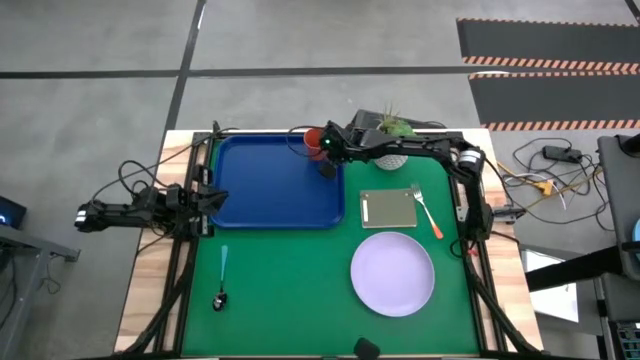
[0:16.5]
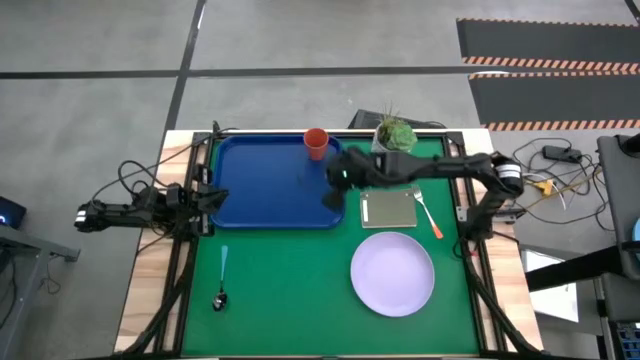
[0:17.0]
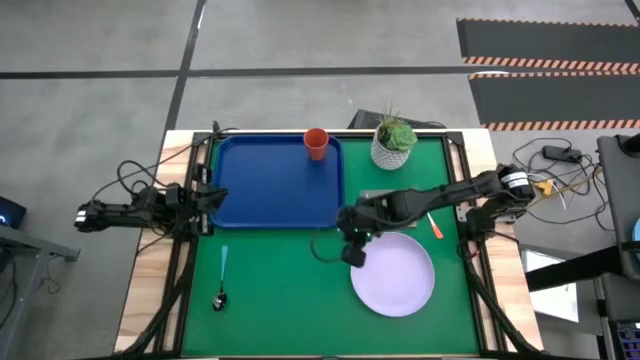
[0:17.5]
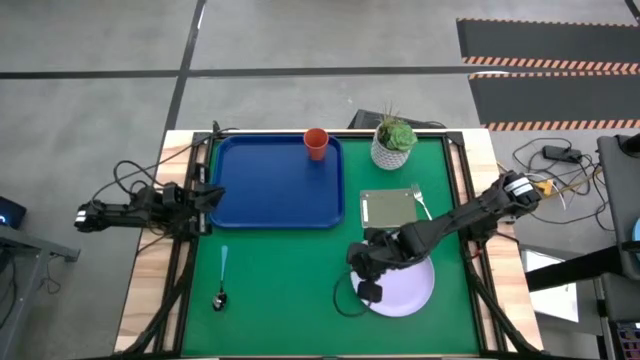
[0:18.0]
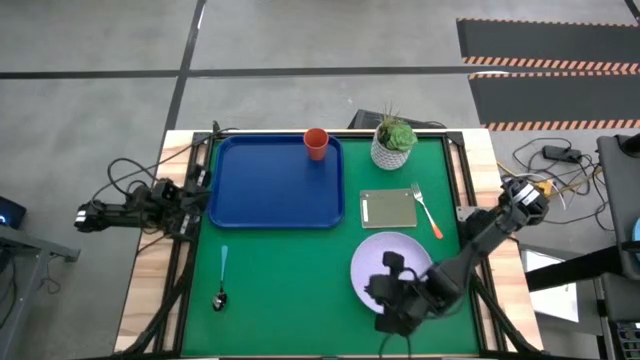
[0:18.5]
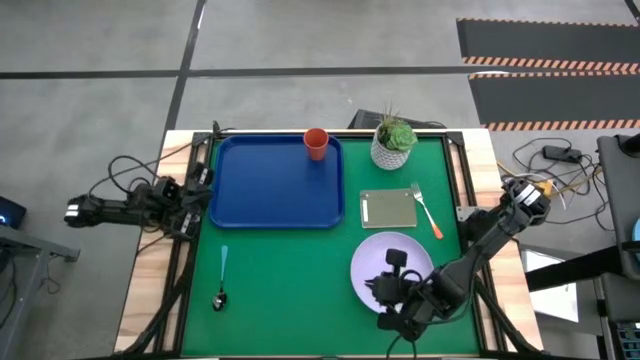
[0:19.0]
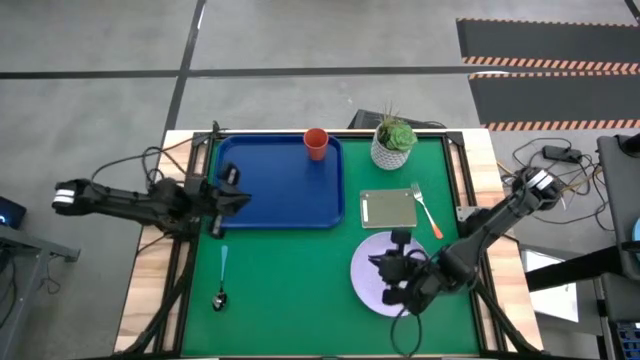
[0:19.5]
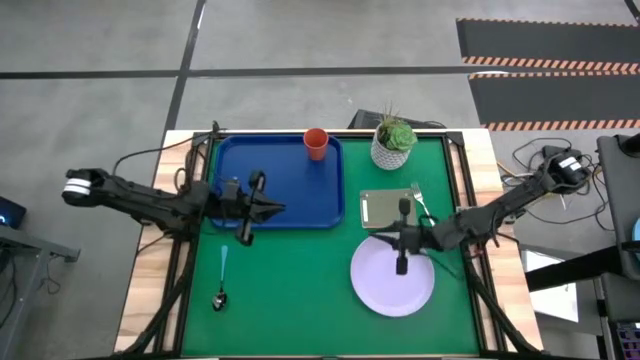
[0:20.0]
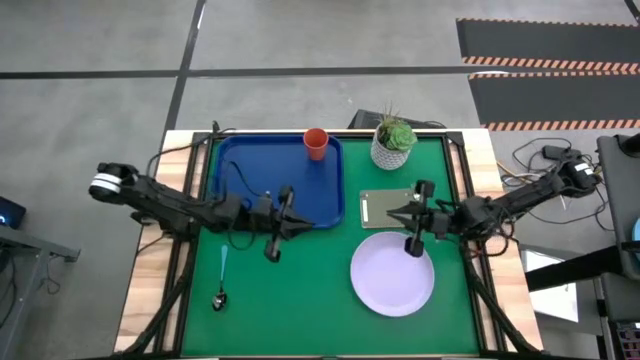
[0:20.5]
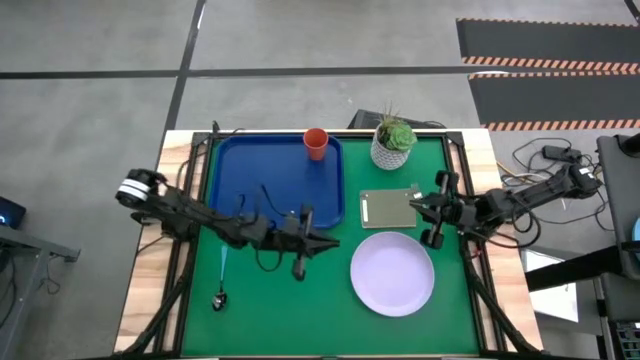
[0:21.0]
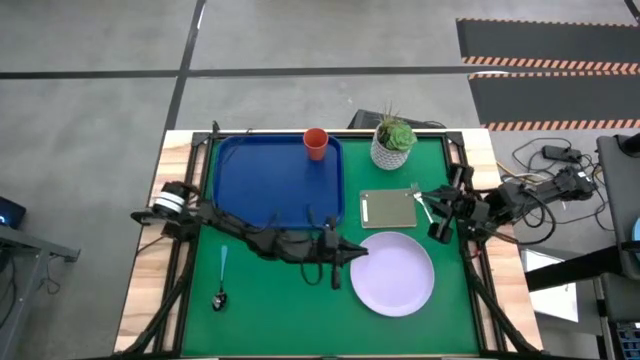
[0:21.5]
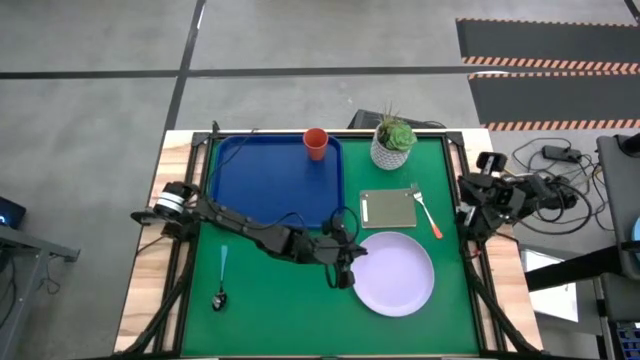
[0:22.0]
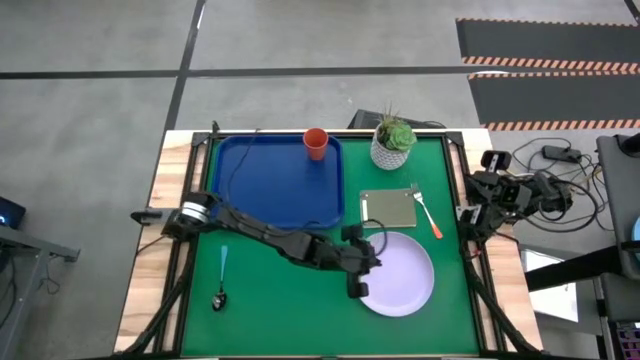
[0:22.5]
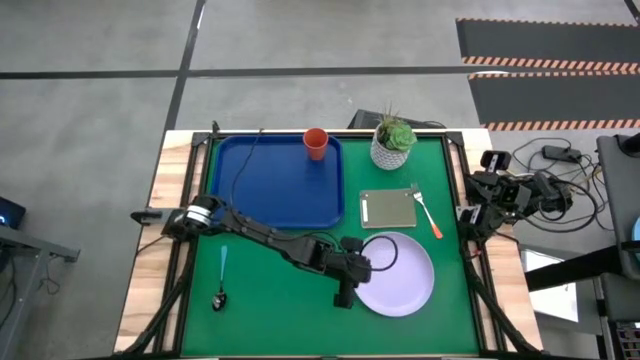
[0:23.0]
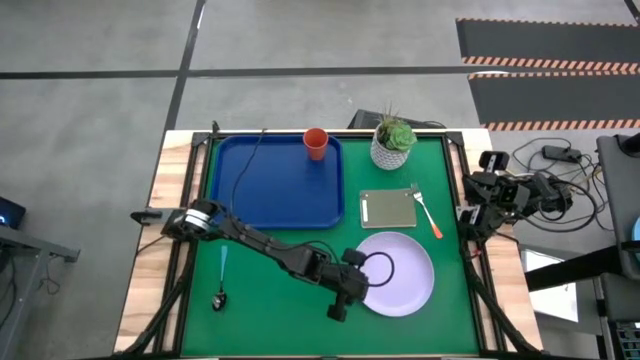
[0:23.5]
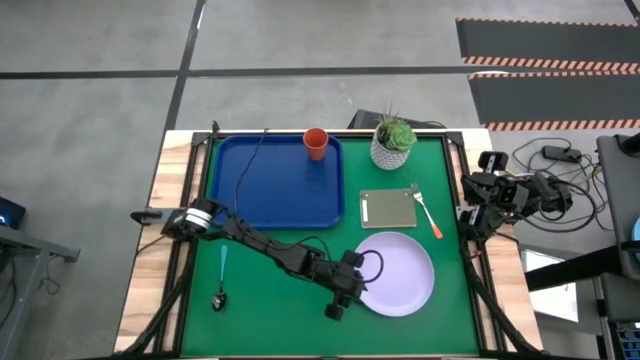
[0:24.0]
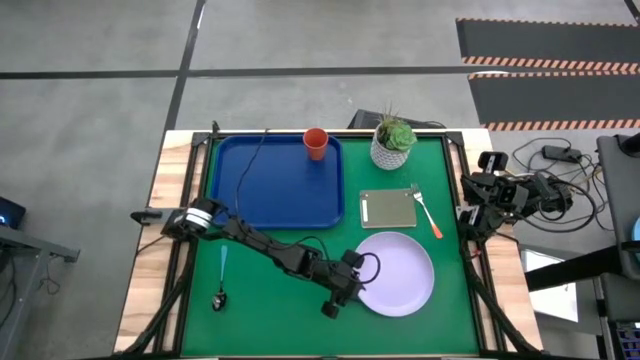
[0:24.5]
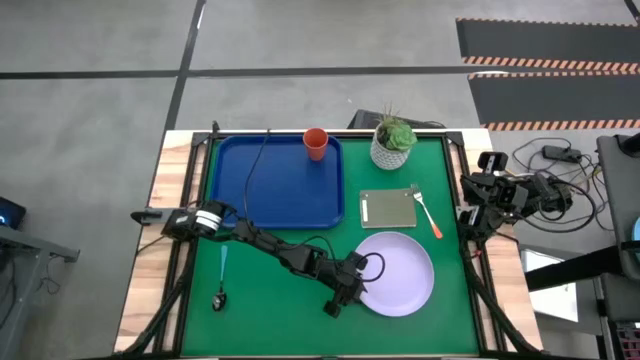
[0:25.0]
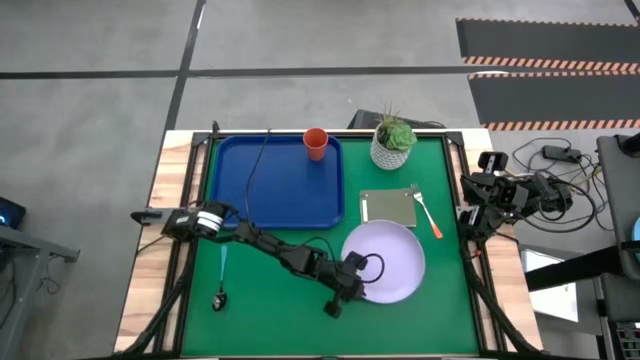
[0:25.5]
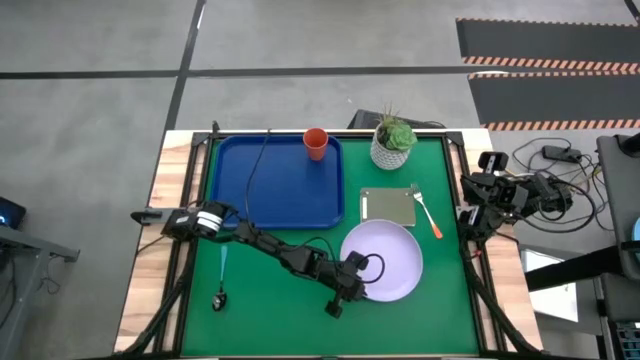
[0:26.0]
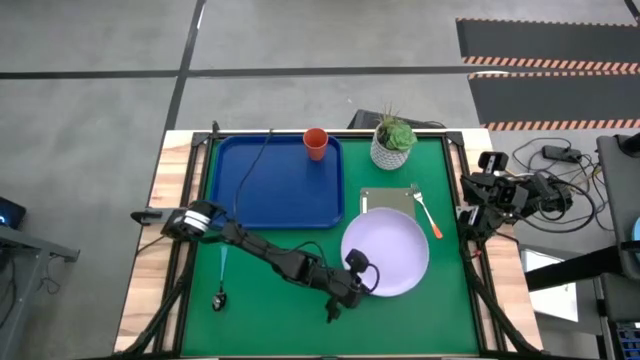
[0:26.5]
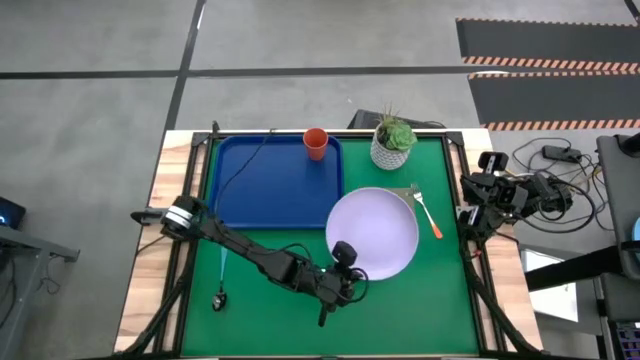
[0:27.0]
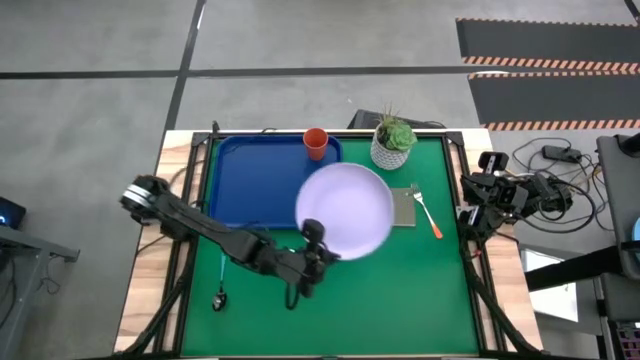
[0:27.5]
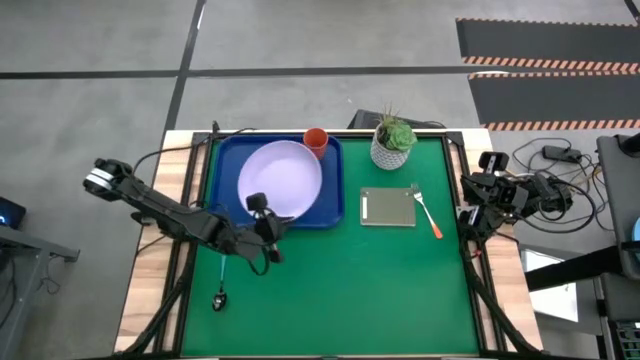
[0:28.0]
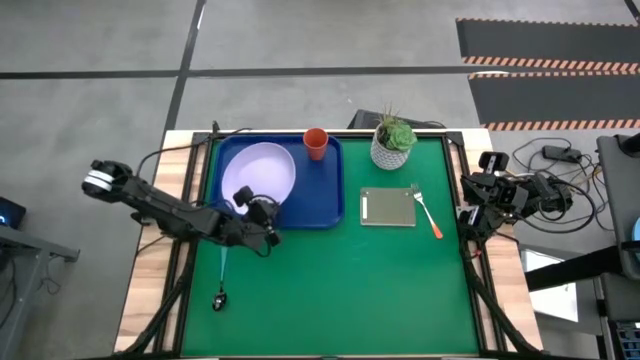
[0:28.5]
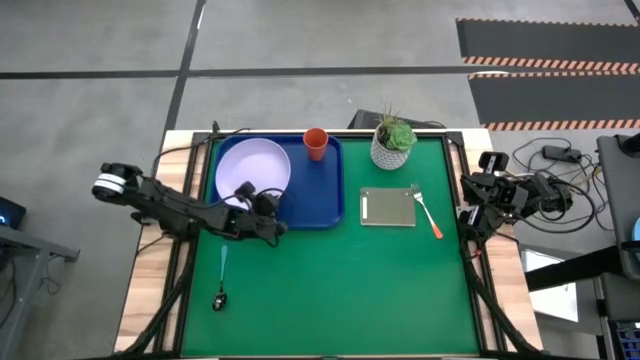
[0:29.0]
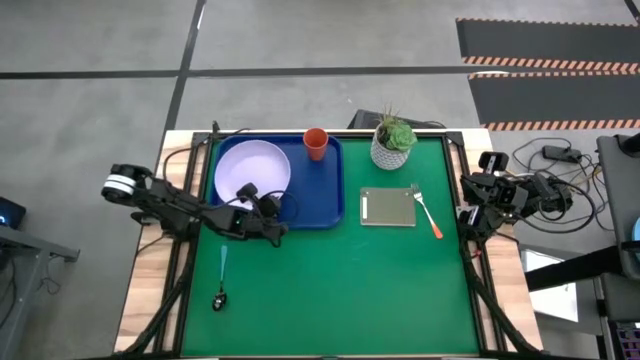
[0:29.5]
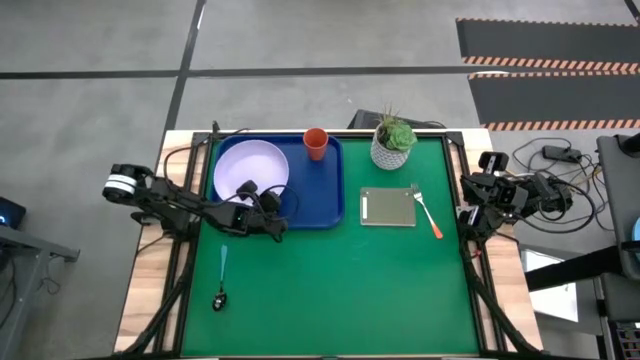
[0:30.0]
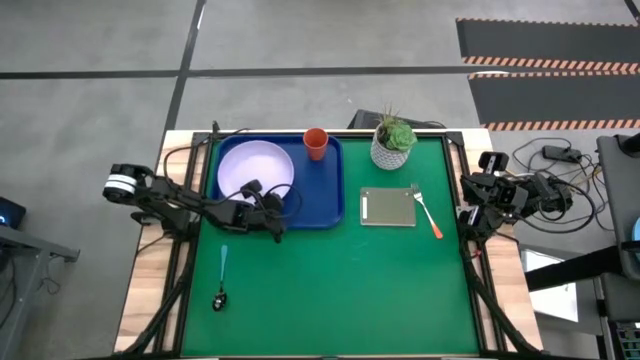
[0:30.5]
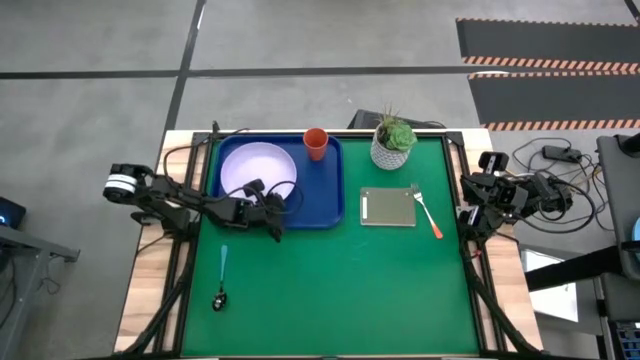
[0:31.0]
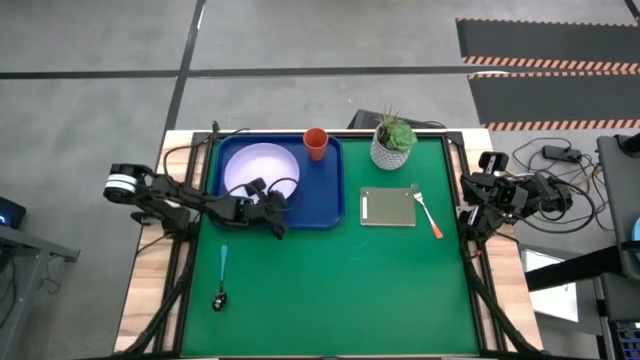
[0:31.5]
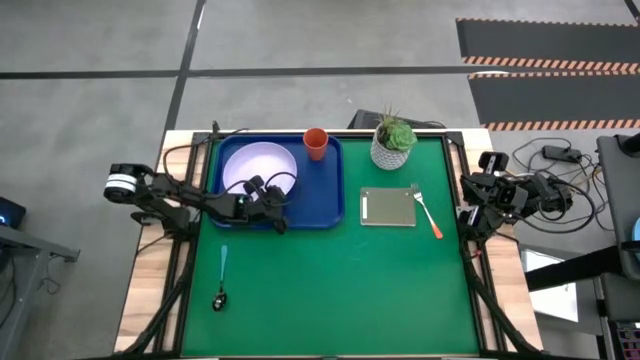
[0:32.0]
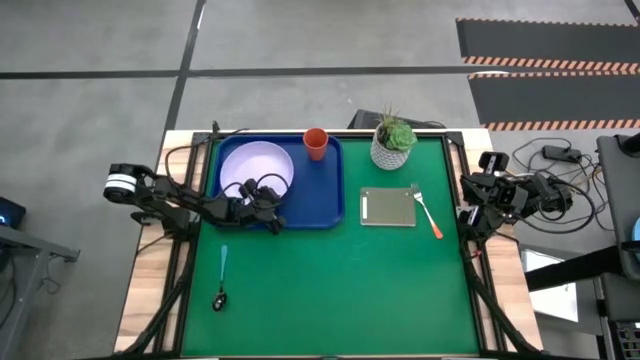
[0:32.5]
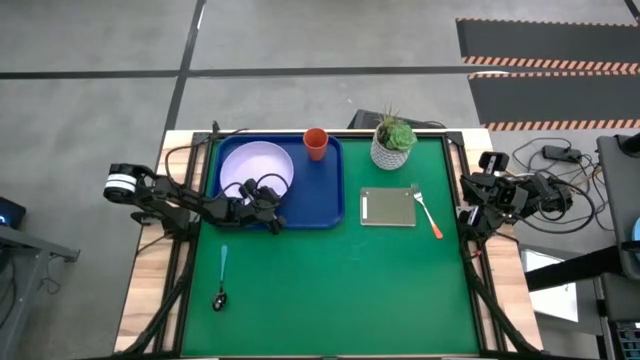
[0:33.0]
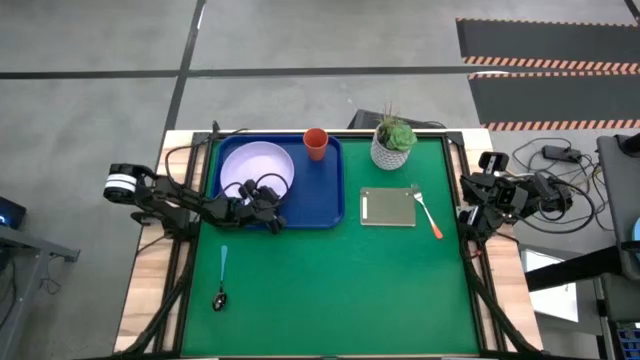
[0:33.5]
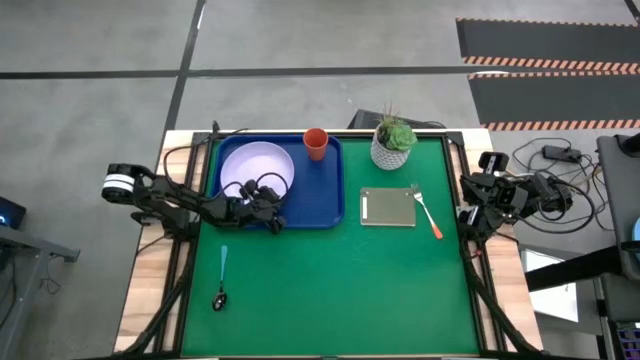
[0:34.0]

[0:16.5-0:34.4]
Task: Pick and place plate/cup/fork/spoon on tray
Put the purple plate to the left side of the orange cup on the dark blue tray

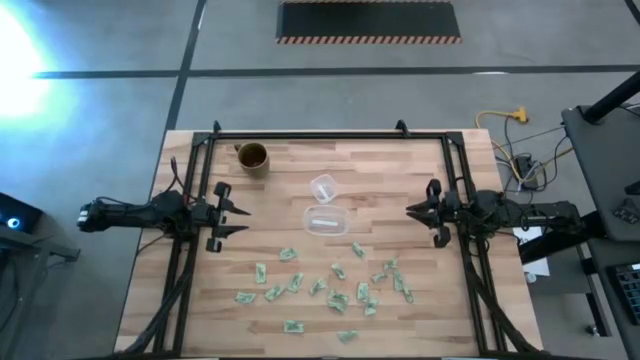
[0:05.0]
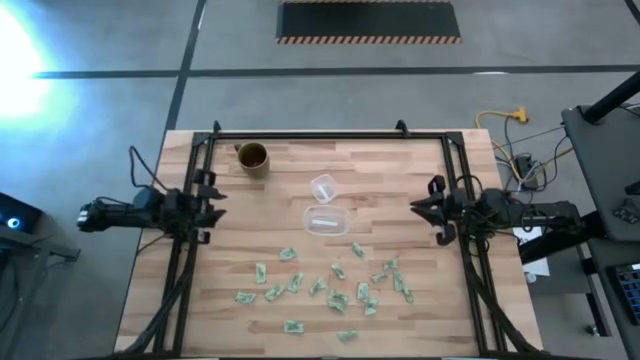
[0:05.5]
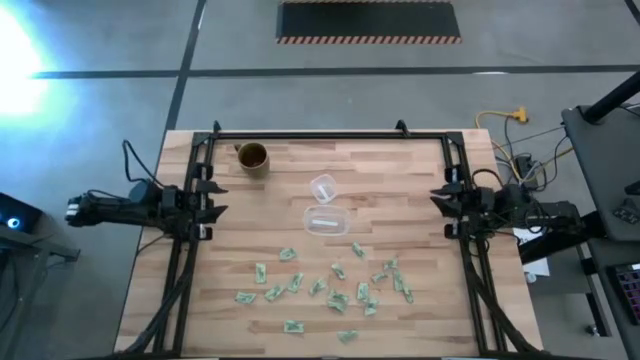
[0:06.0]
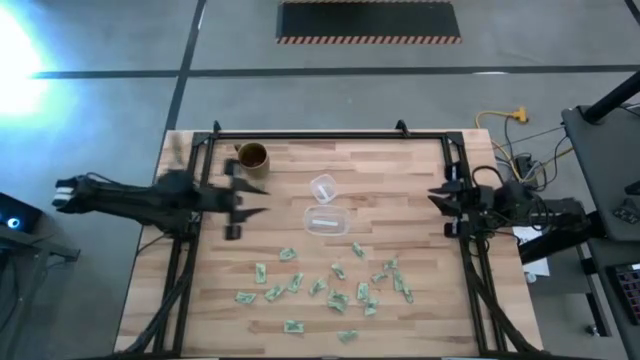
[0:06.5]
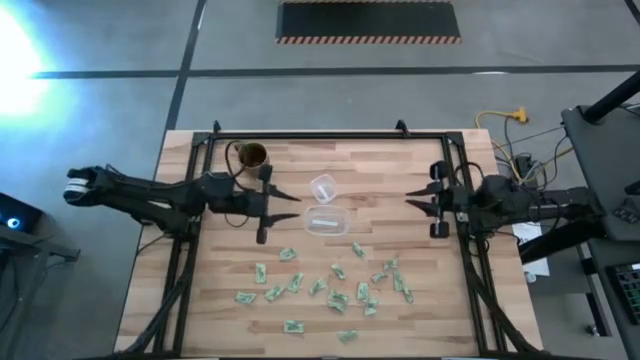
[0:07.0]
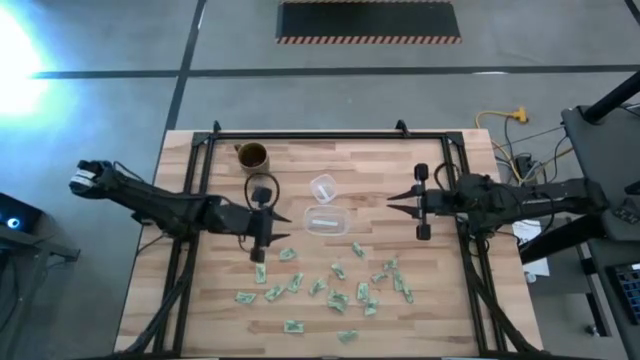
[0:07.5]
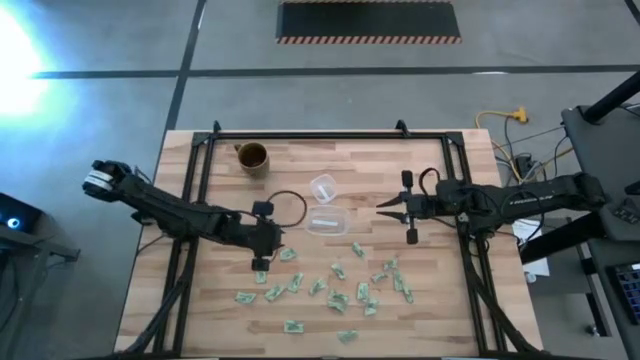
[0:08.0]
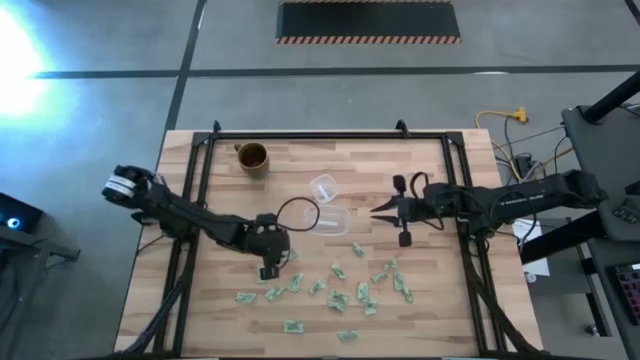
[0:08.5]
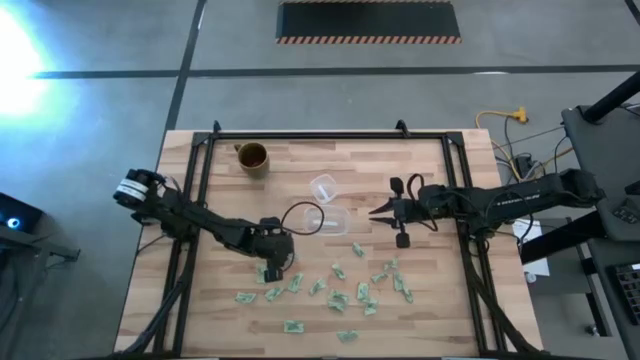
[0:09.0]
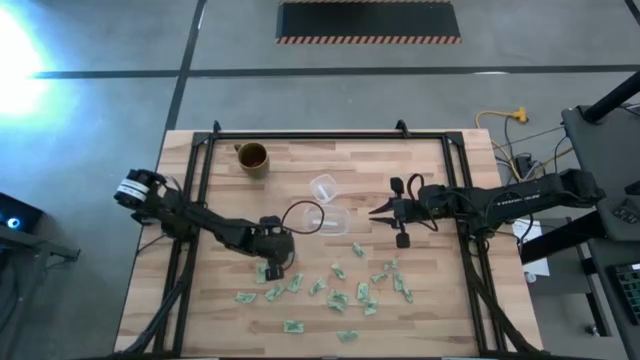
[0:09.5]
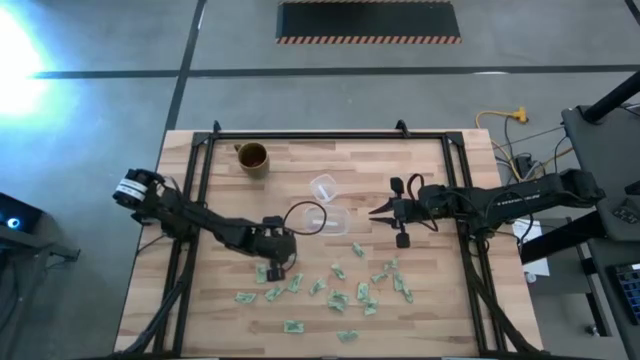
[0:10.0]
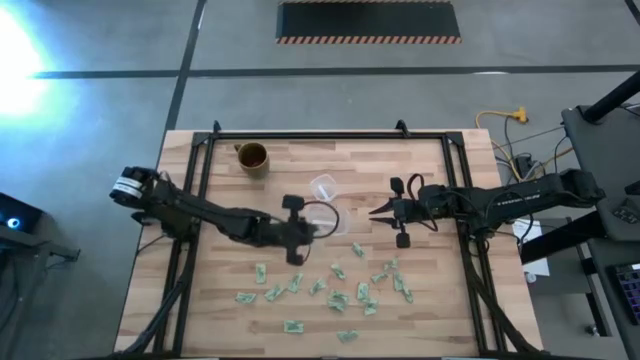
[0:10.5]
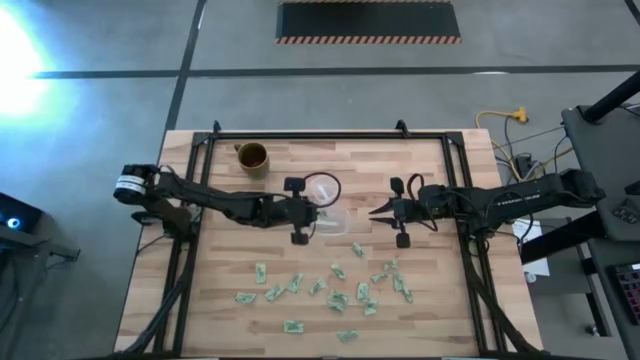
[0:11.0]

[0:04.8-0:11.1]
Task: Pick and place Stevia / Truvia into bins
Put the stevia packet into the bottom transparent container
